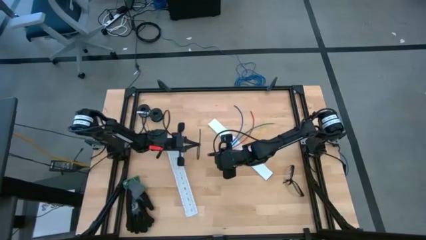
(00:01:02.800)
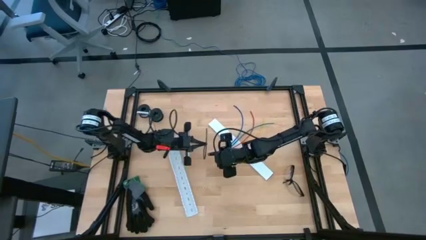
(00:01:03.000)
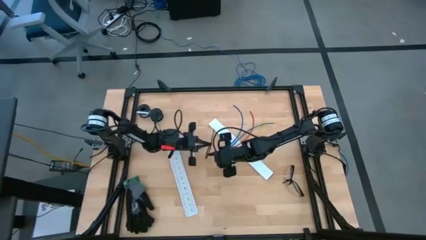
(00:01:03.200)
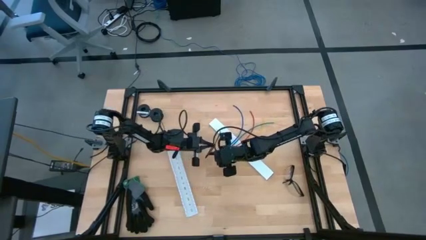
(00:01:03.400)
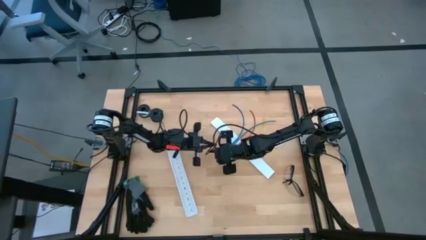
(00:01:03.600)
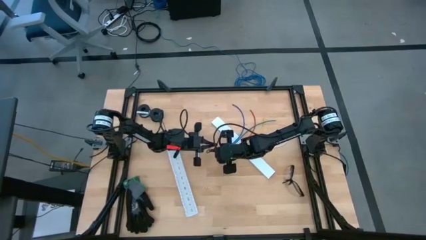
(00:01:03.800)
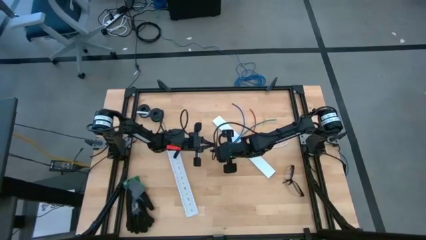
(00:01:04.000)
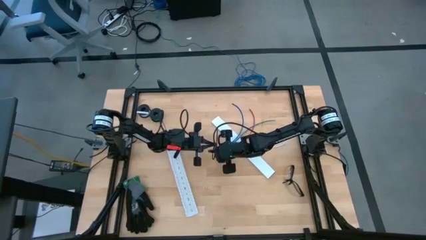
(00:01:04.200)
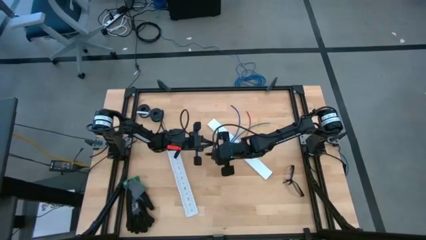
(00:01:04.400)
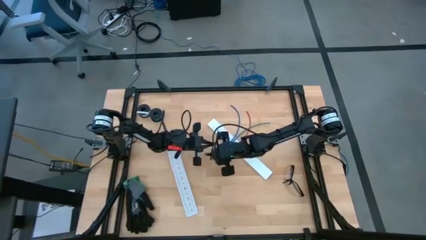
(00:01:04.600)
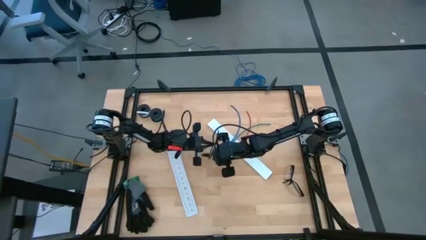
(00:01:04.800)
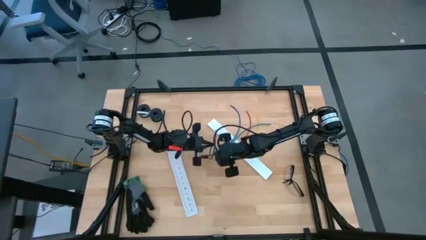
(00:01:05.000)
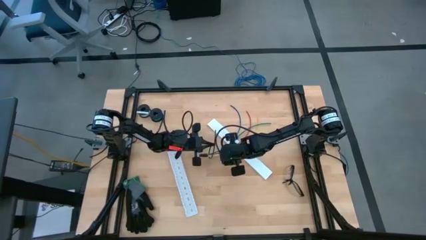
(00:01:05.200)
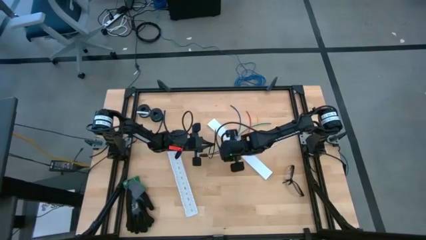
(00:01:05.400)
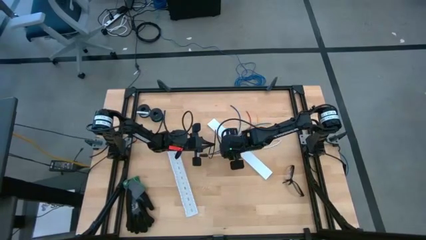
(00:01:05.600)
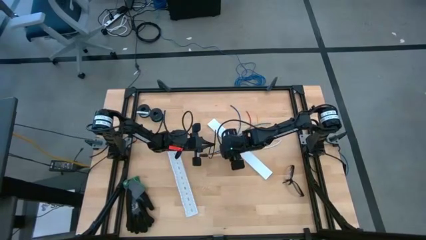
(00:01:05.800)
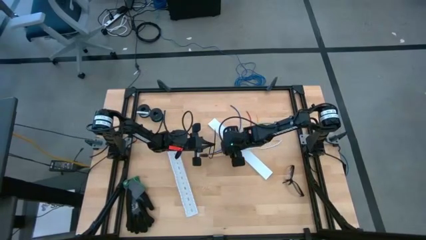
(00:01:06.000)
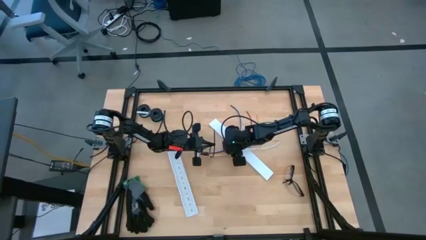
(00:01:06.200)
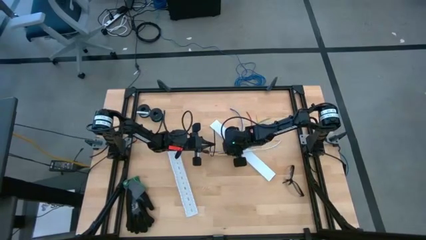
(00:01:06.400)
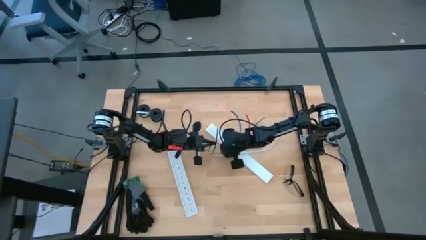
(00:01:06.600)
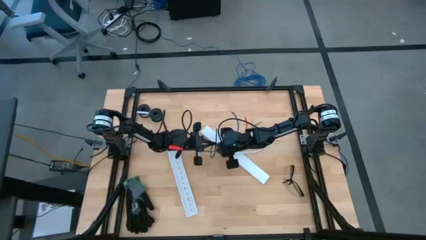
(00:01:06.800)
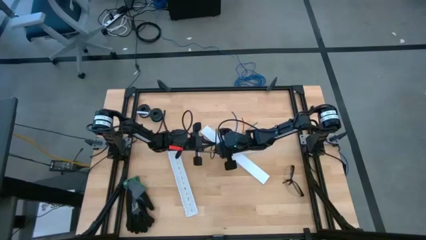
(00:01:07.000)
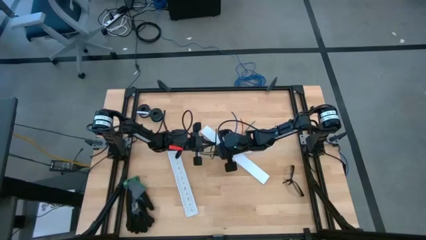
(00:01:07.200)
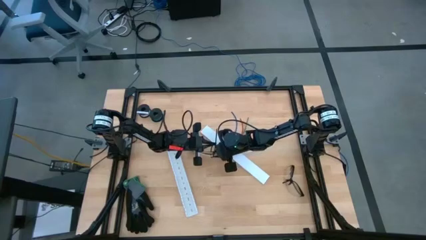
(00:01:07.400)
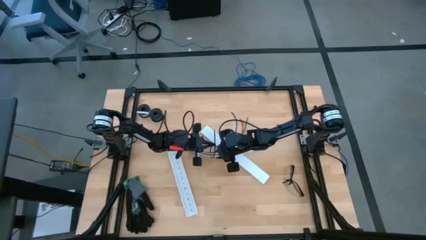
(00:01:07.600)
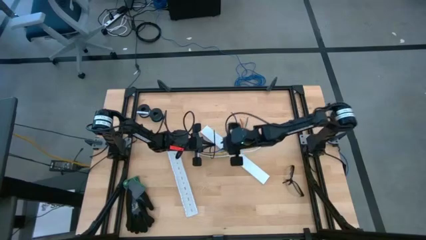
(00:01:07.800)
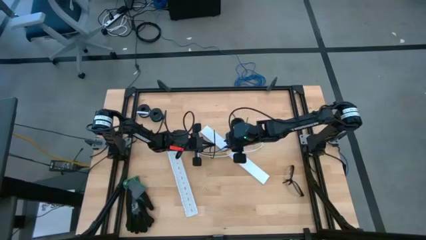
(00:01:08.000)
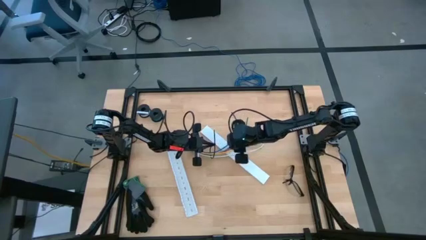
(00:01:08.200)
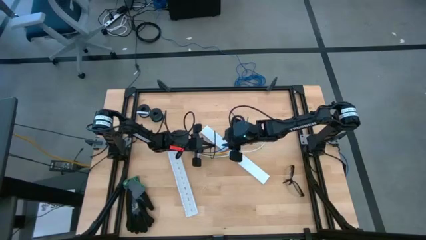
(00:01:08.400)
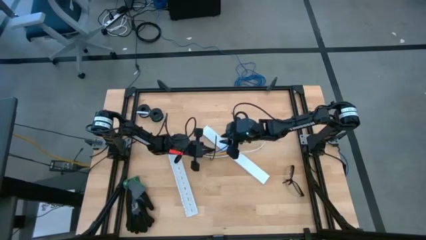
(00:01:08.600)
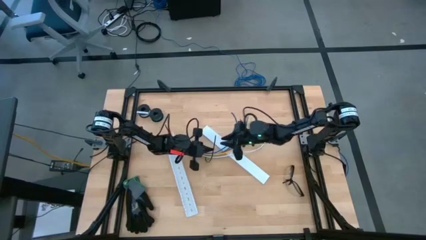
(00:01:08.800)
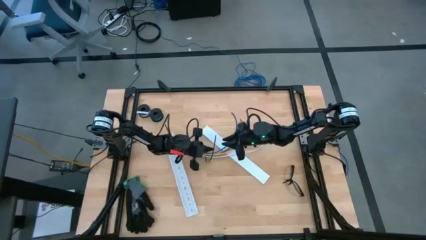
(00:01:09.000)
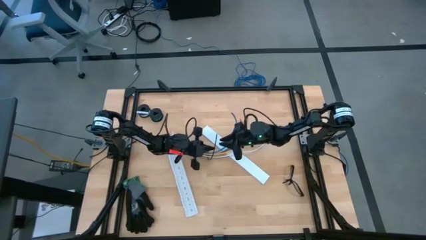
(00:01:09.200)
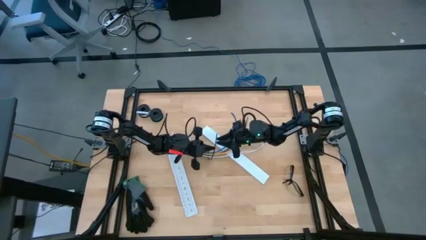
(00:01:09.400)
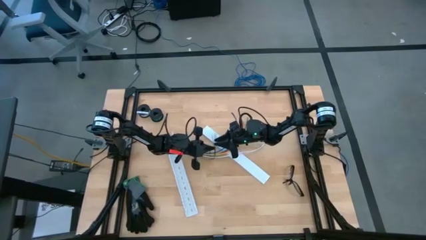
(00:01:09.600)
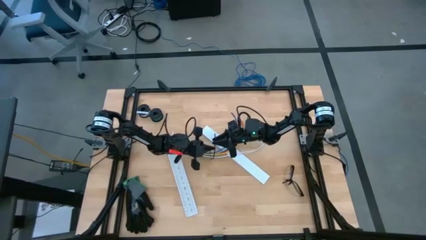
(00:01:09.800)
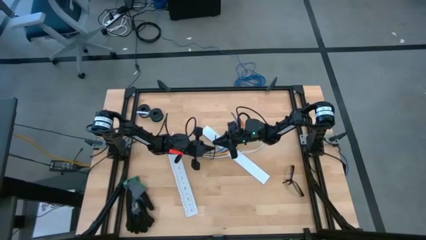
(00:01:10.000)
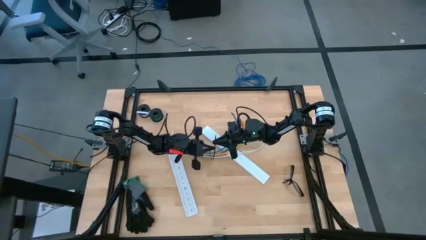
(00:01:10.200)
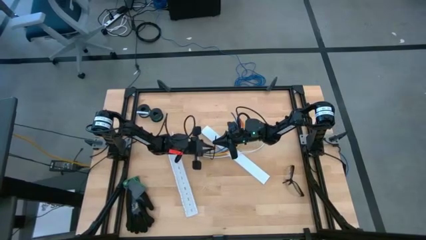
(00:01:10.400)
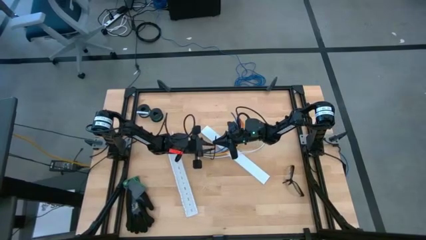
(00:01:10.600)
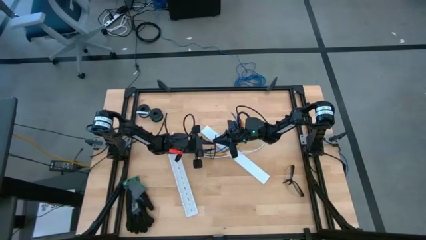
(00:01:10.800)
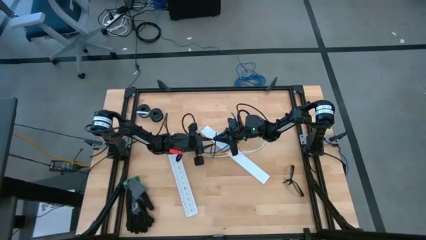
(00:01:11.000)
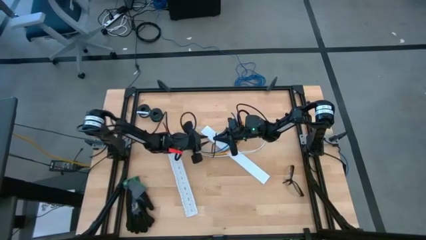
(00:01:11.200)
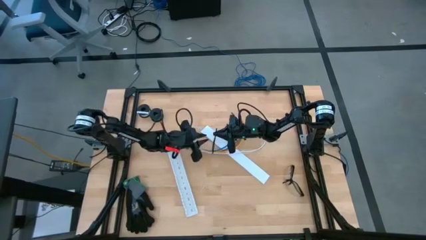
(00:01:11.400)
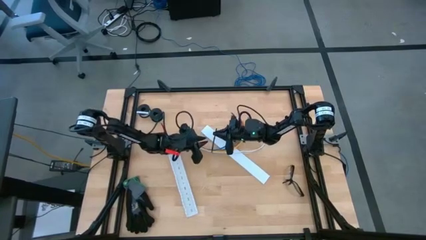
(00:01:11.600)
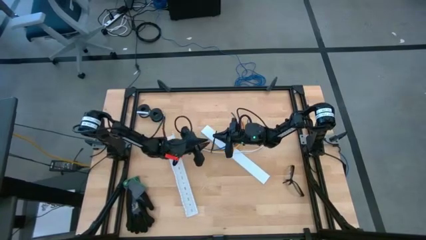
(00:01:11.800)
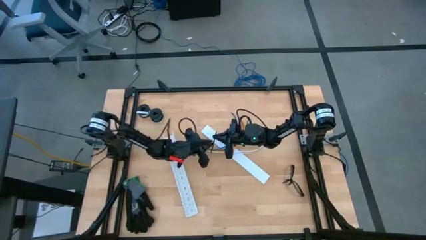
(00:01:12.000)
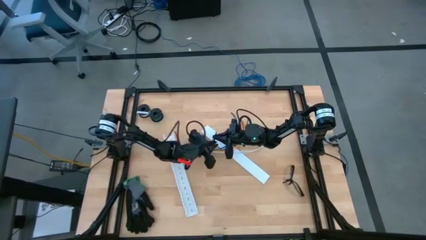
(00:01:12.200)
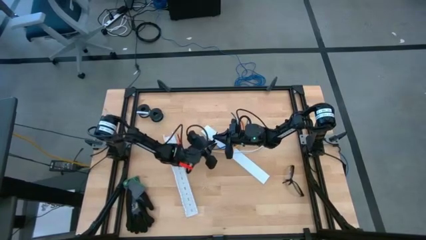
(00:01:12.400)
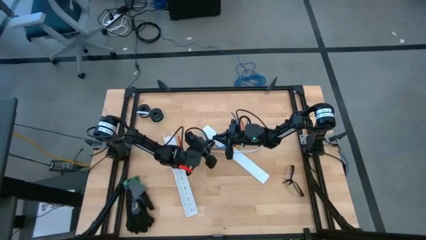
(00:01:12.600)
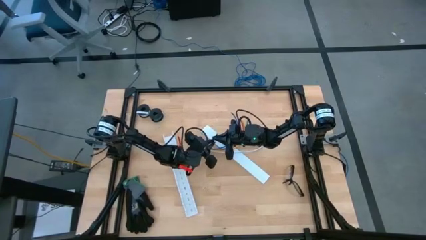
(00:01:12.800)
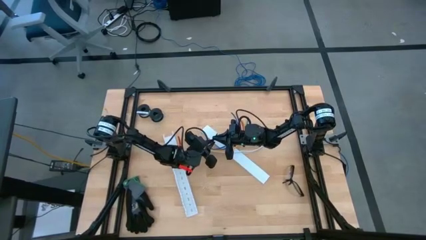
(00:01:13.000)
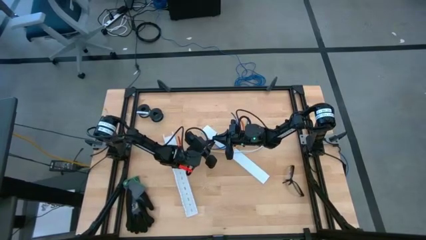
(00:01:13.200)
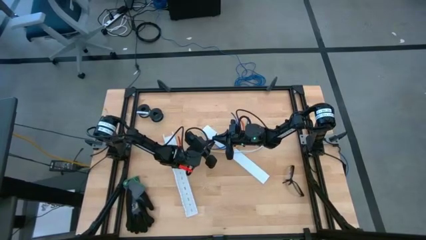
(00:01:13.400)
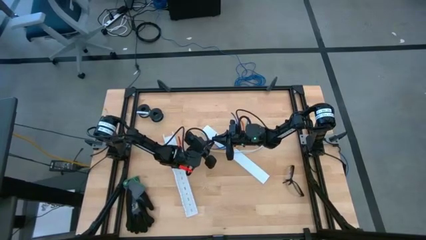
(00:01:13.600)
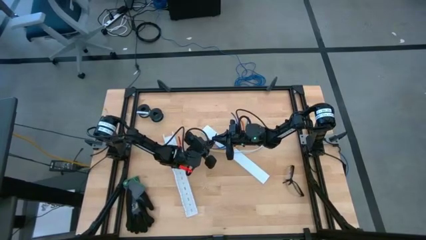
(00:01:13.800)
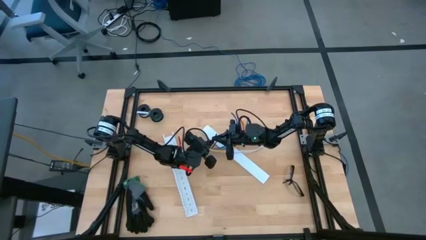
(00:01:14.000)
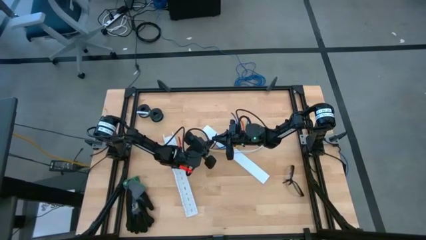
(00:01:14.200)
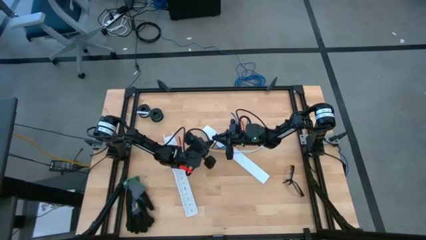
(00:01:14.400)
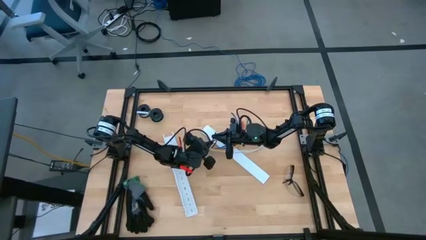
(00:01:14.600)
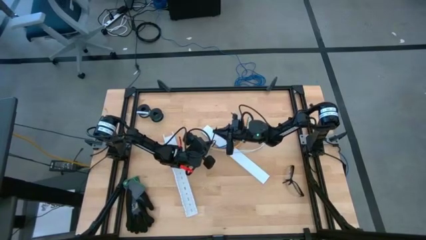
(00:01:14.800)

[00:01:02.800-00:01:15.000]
Task: Ziptie cables
Wrap the cables together using the black zip tie

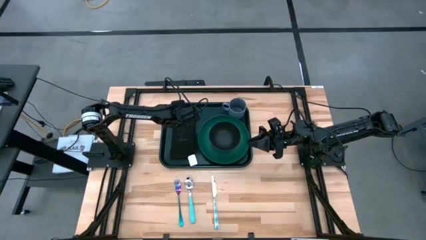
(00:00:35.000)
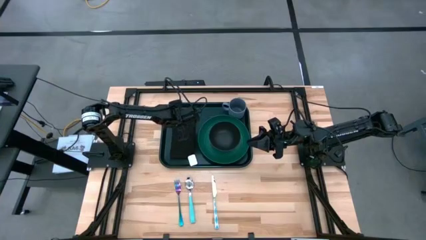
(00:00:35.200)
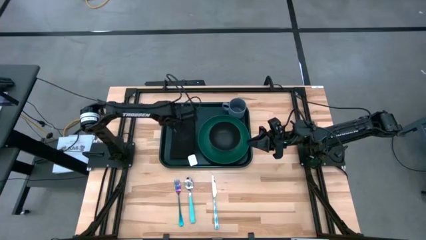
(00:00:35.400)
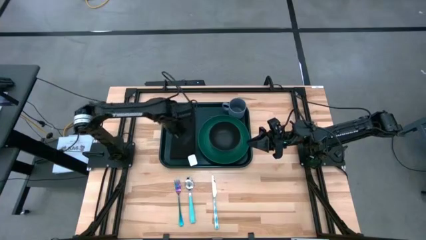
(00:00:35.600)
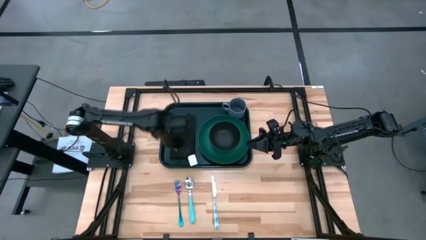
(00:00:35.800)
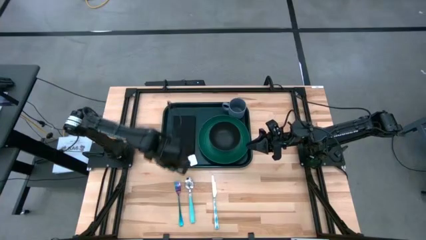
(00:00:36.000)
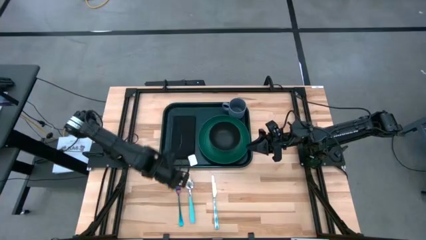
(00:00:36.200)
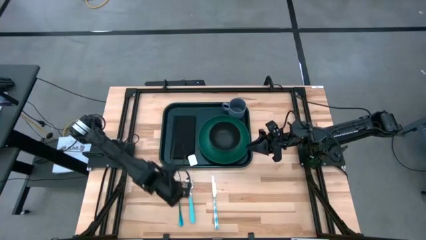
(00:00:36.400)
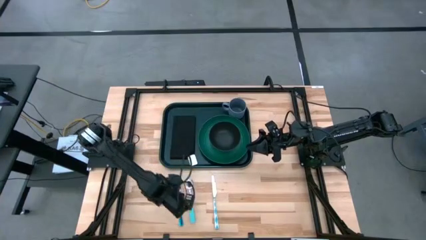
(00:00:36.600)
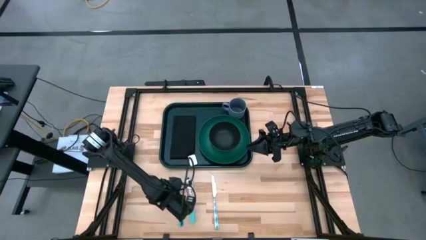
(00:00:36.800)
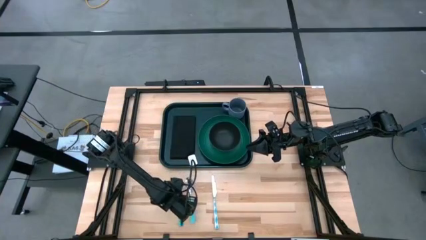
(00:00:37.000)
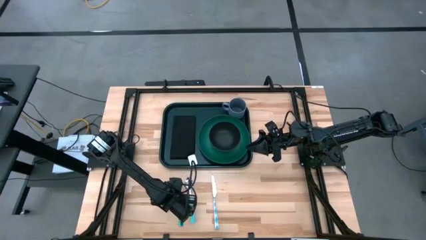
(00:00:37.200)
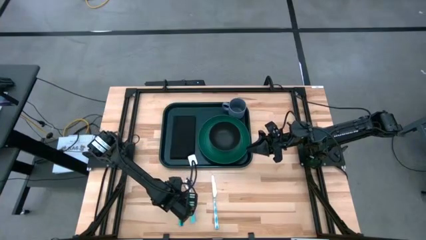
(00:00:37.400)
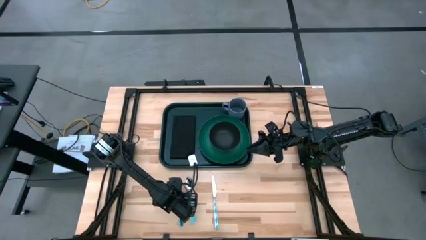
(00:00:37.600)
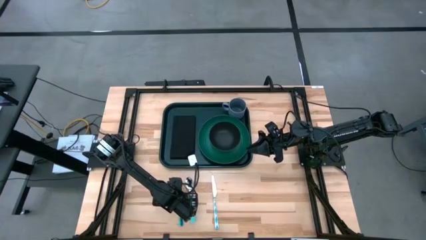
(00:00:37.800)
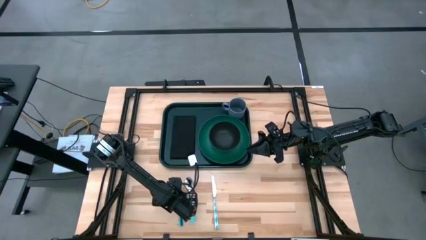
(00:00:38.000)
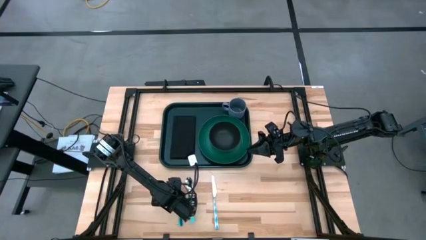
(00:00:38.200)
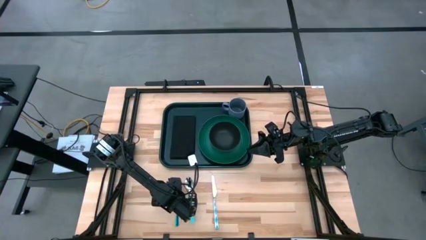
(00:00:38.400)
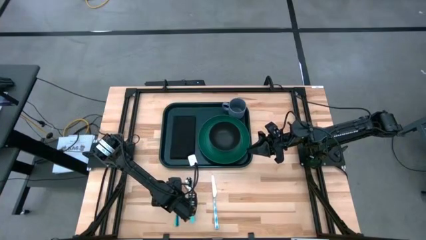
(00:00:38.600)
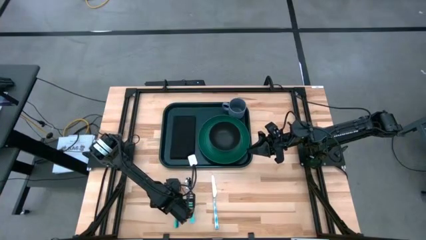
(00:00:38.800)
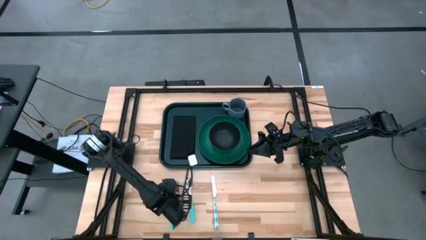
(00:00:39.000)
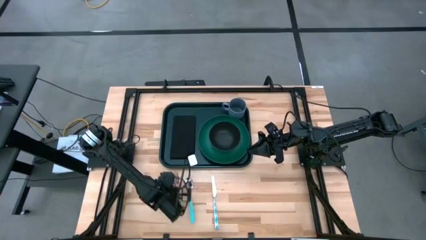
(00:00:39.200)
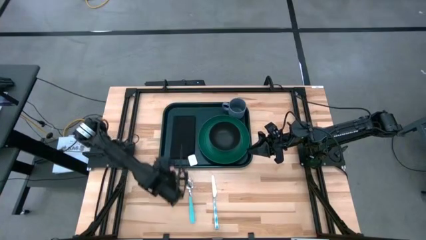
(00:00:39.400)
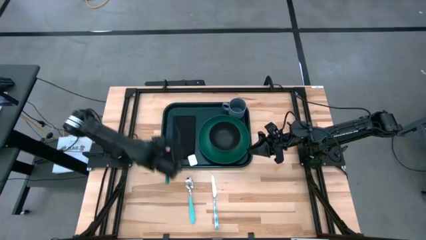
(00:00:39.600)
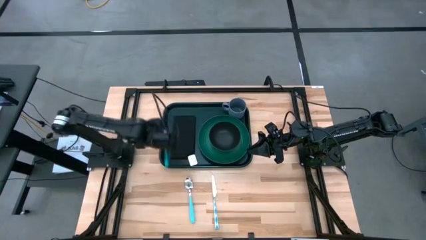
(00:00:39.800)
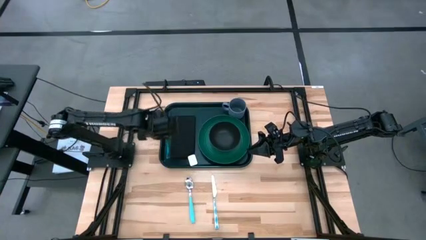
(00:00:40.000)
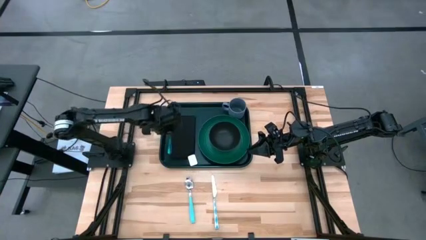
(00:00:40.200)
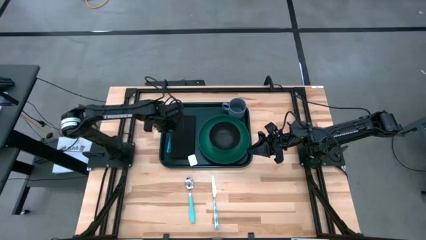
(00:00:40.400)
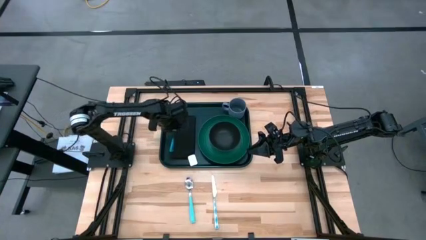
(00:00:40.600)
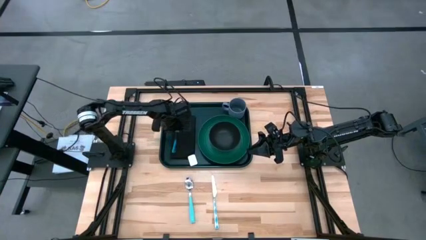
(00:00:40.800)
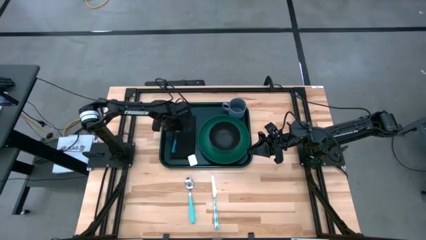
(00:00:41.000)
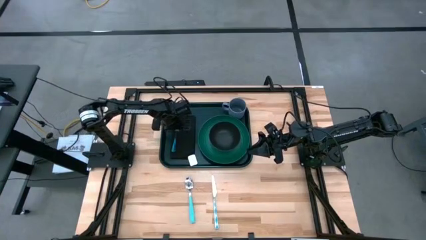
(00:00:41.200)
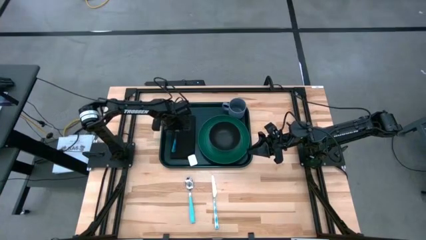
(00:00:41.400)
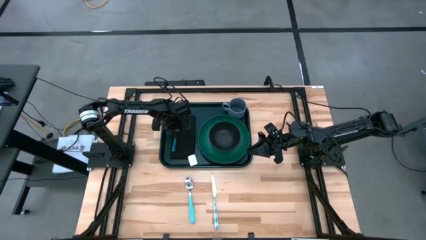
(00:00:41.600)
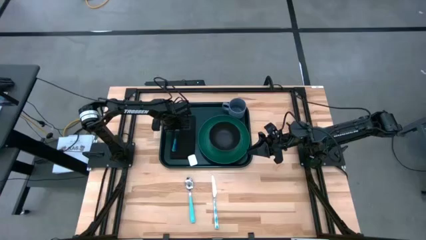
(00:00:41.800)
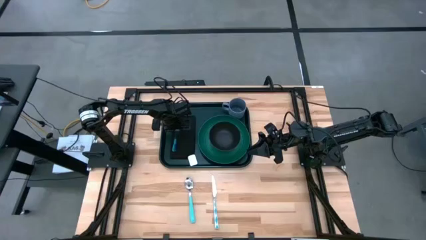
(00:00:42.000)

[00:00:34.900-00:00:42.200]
Task: Set up tray
Put the blue fork on the black napkin to the left of the green plate
